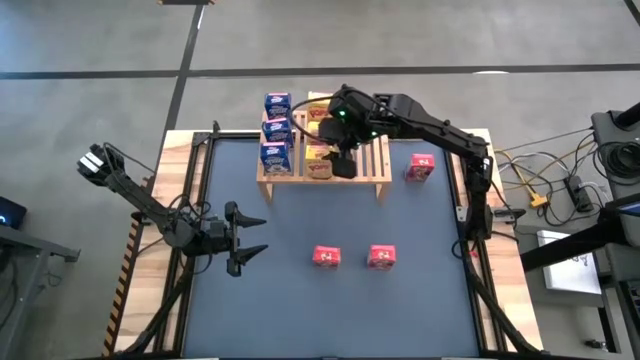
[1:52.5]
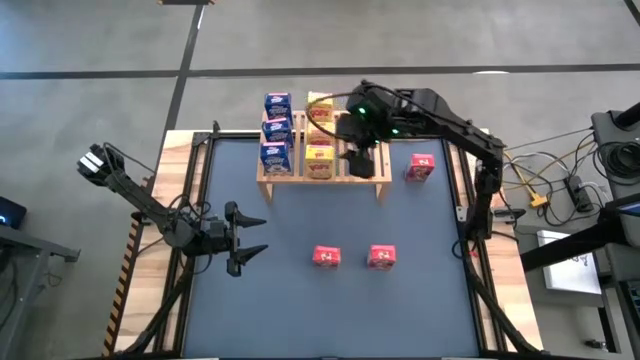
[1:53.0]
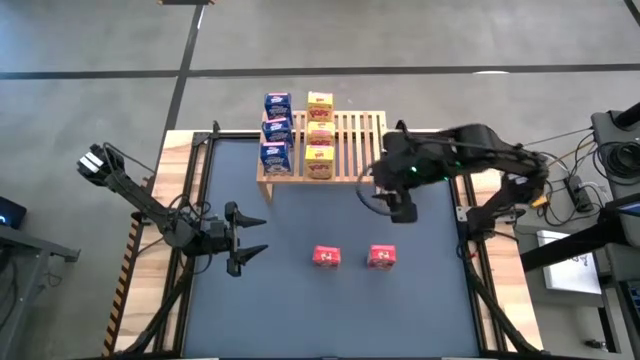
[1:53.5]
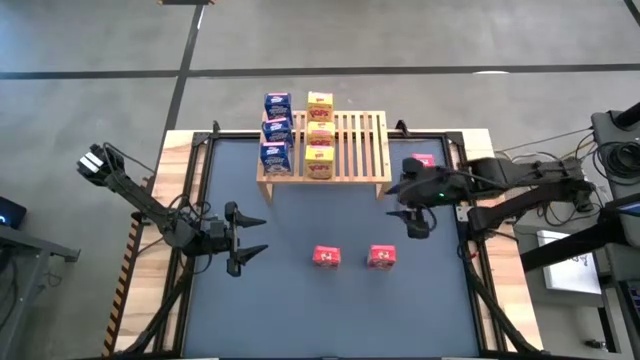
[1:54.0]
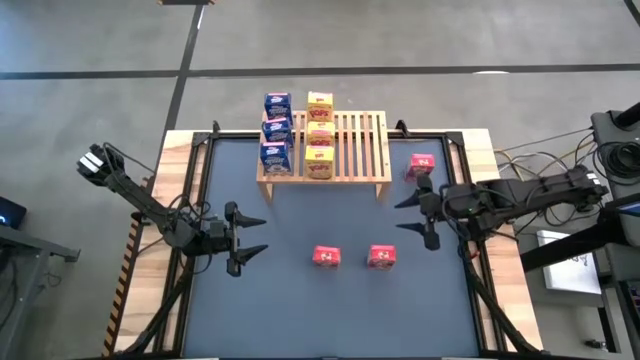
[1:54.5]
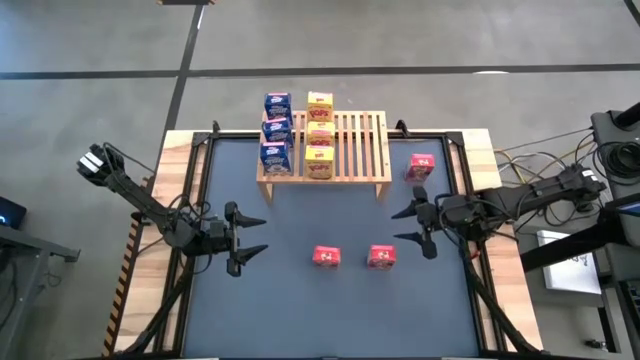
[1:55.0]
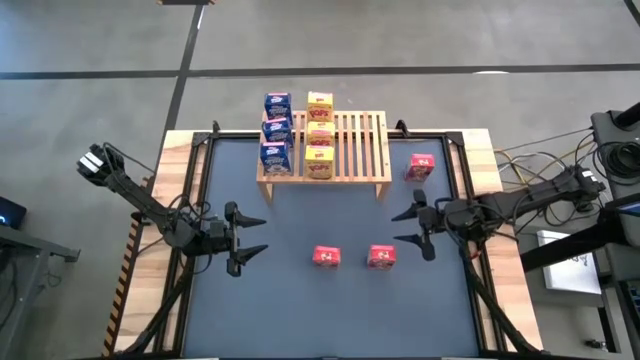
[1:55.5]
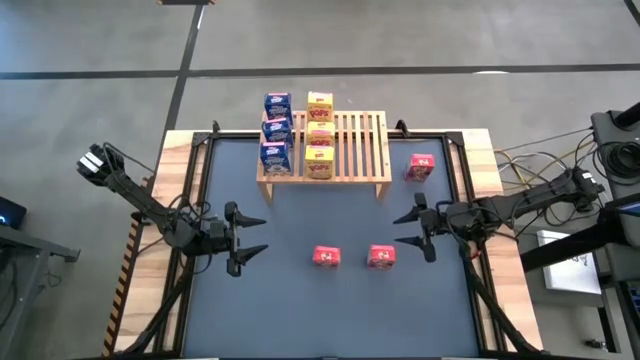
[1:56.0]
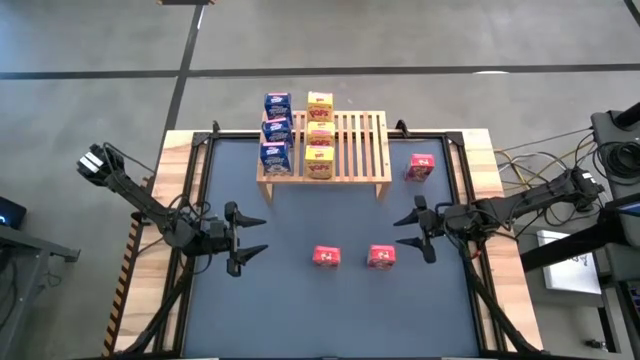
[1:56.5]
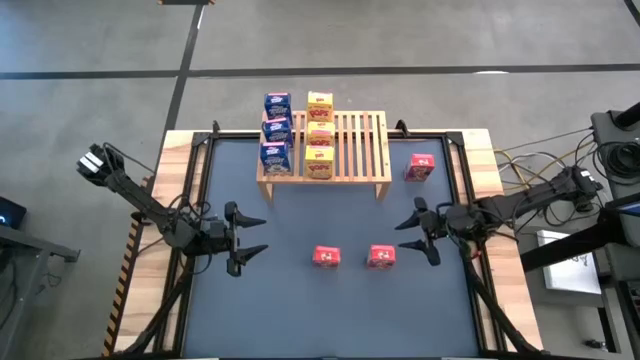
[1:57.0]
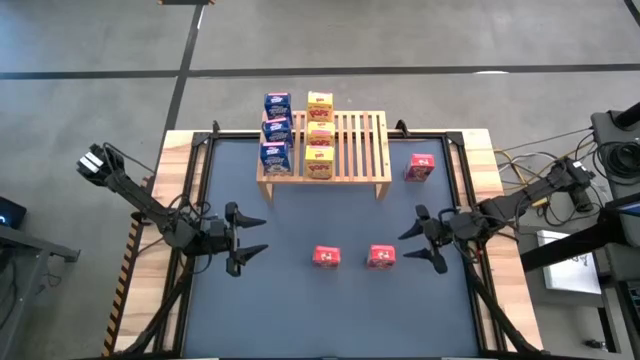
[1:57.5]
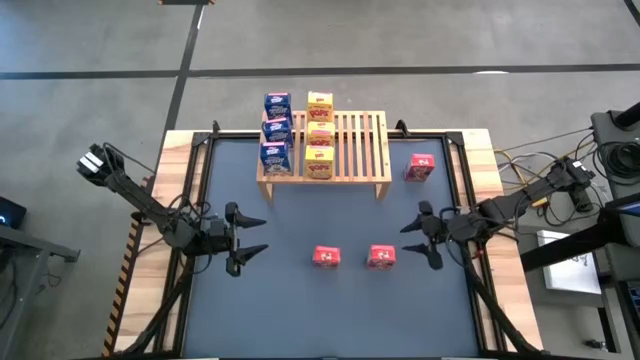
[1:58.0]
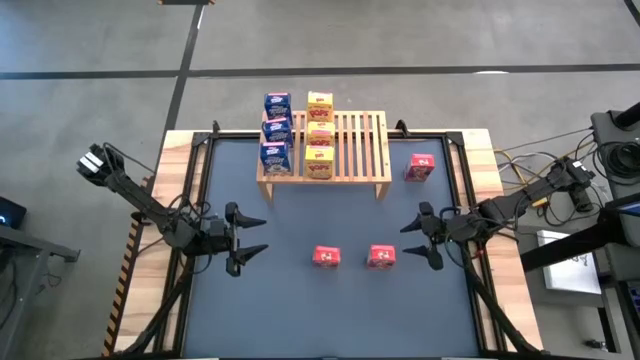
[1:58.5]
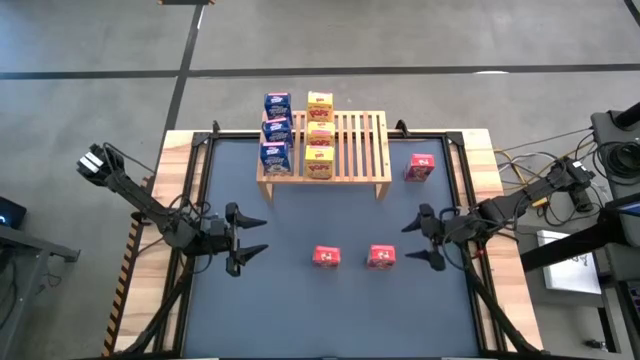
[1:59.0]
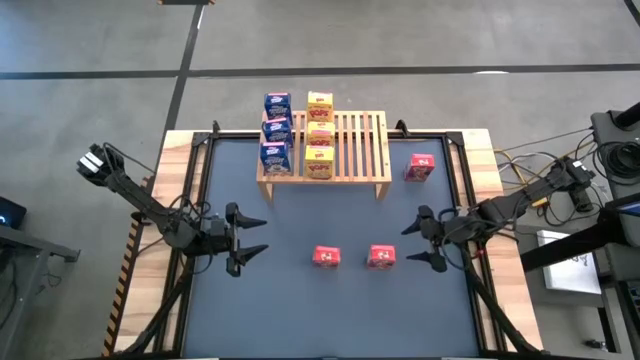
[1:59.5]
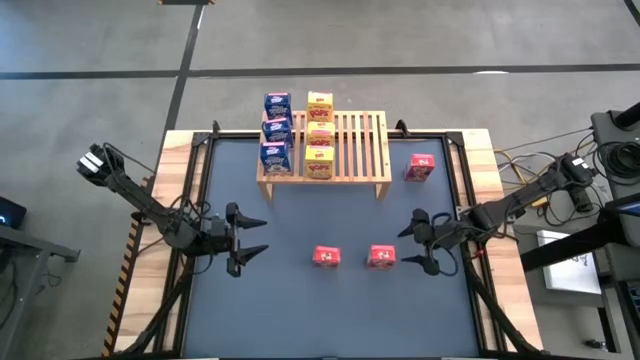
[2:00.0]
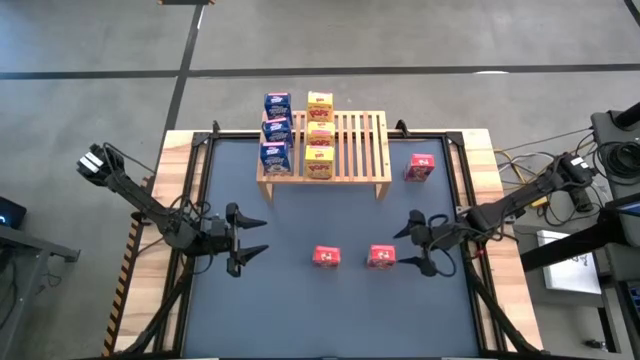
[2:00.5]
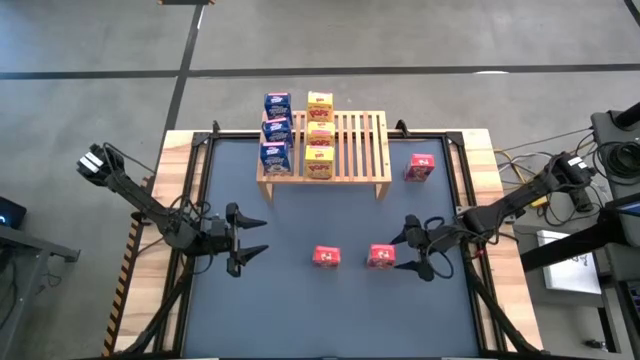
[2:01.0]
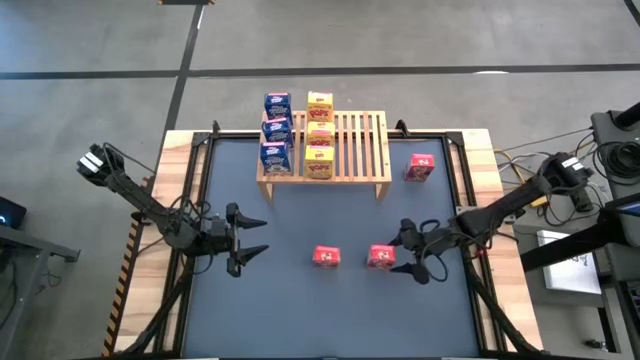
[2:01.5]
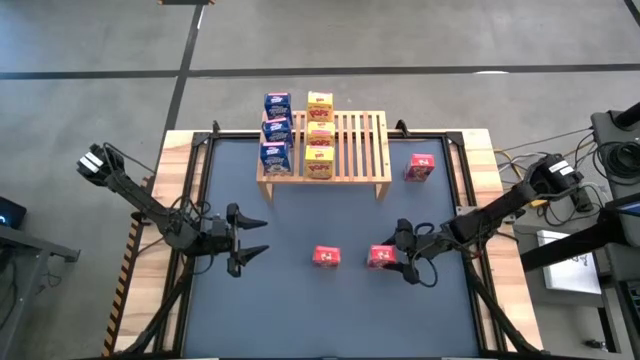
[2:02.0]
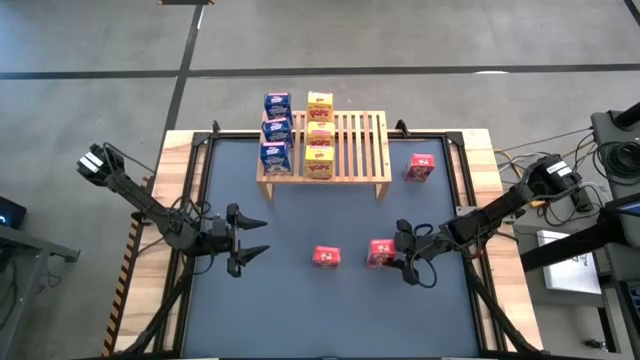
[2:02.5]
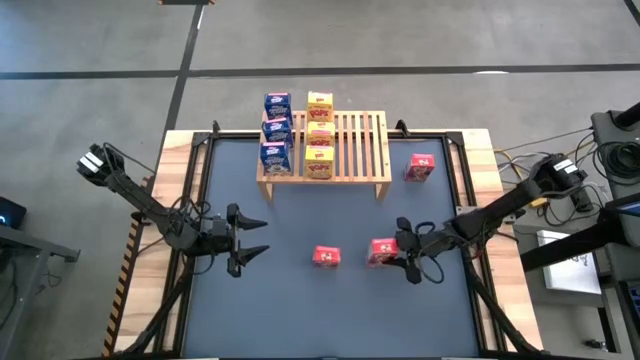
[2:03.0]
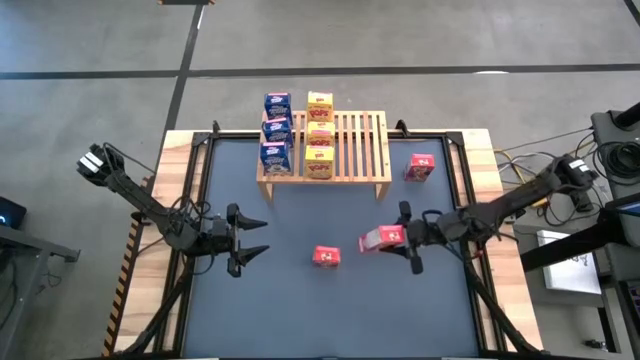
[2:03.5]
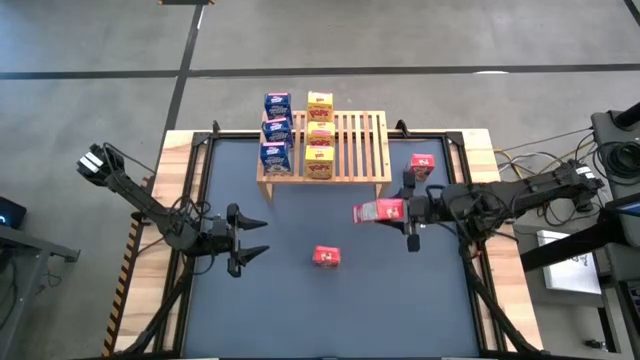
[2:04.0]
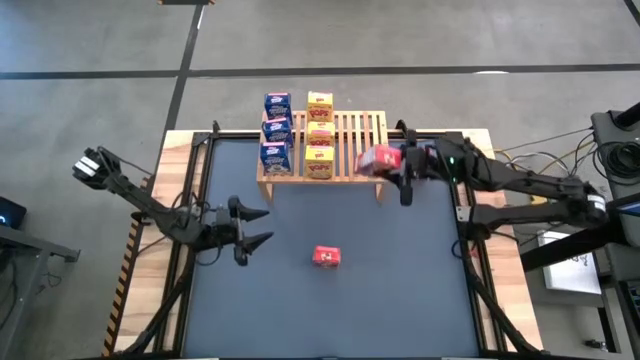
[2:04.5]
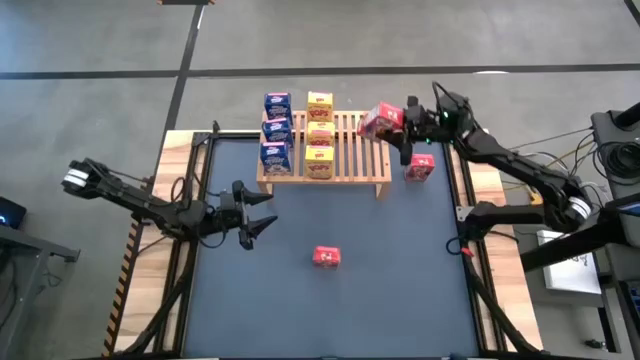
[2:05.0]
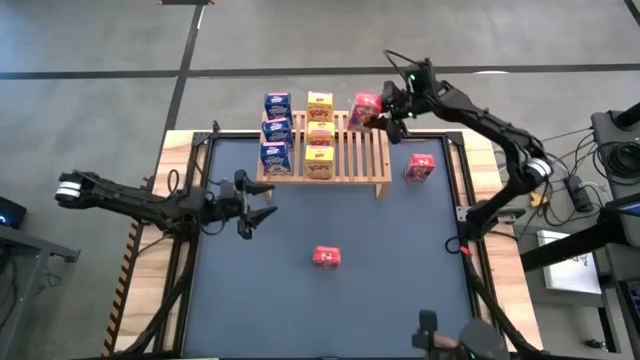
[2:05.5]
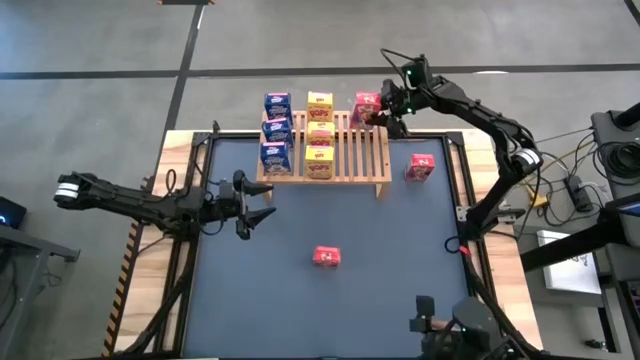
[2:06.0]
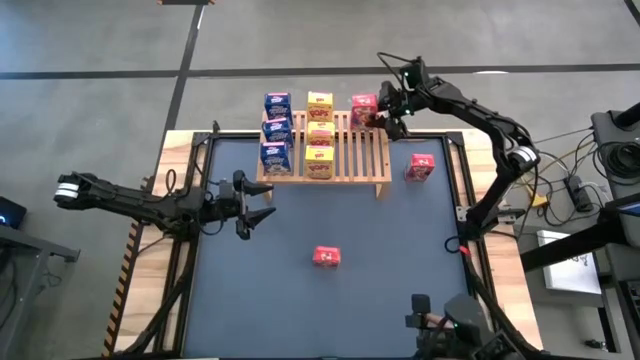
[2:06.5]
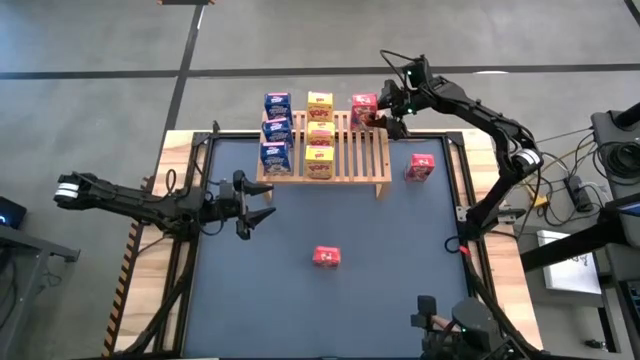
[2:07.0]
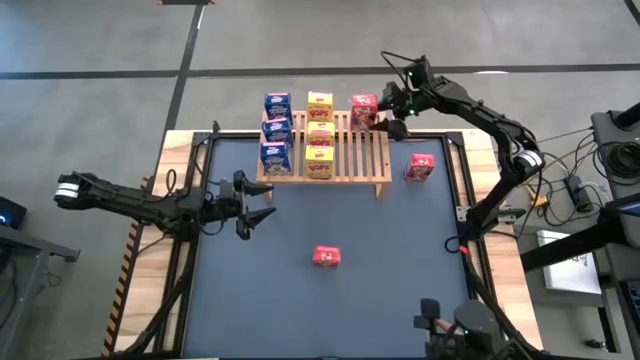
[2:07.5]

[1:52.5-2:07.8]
Task: Stack cereal on shelf
Put the bottom right red cereal box on the shelf

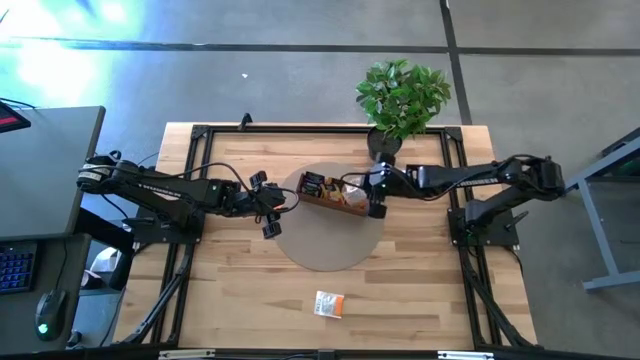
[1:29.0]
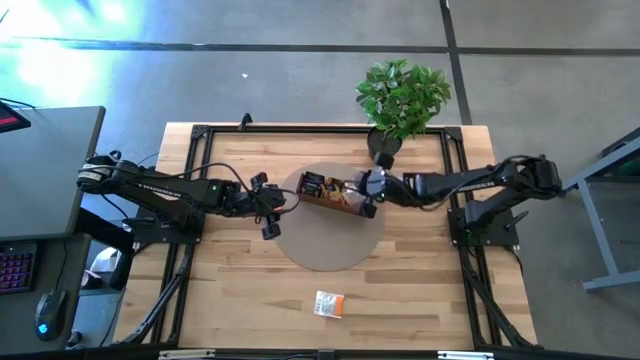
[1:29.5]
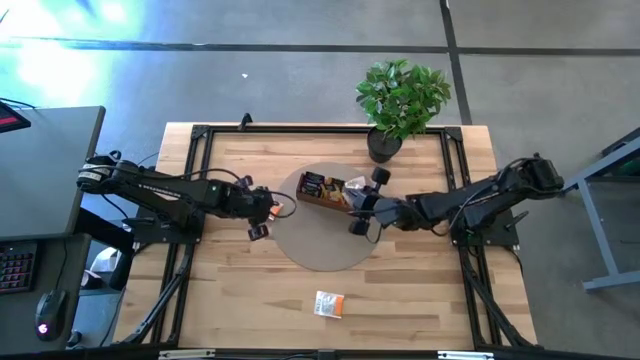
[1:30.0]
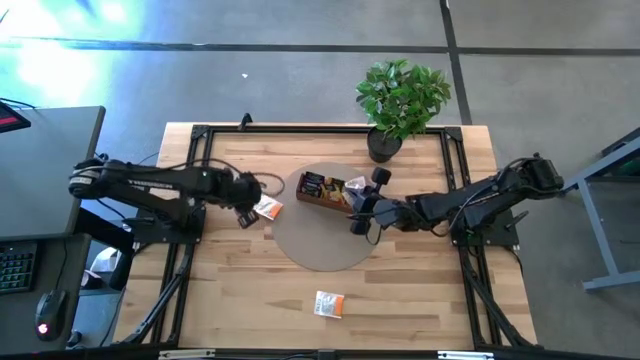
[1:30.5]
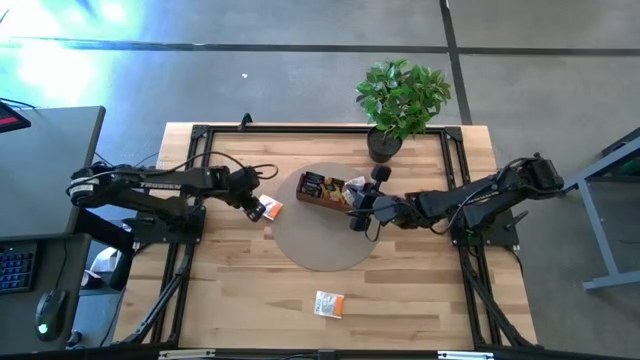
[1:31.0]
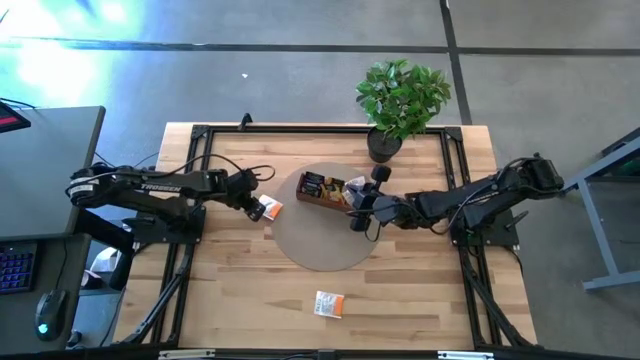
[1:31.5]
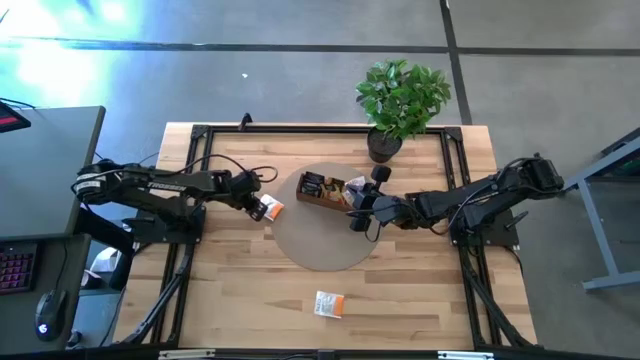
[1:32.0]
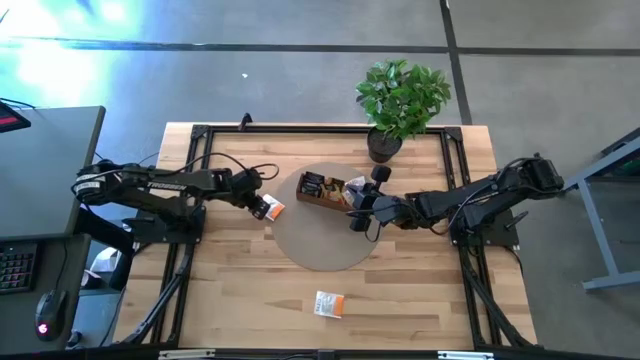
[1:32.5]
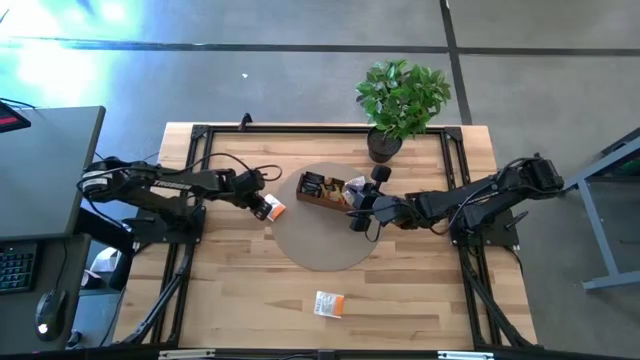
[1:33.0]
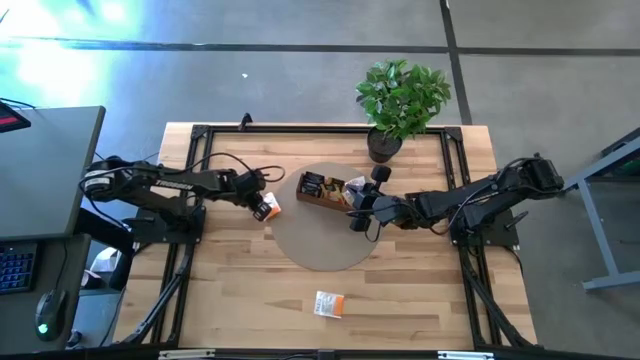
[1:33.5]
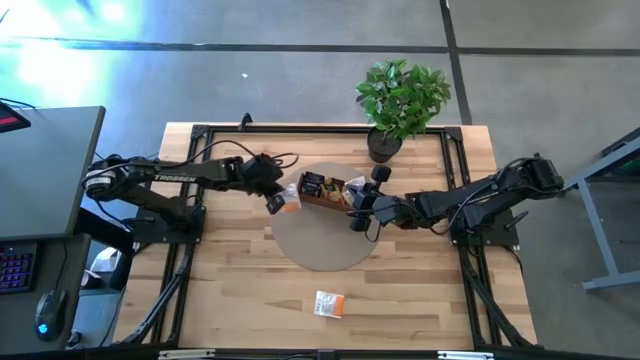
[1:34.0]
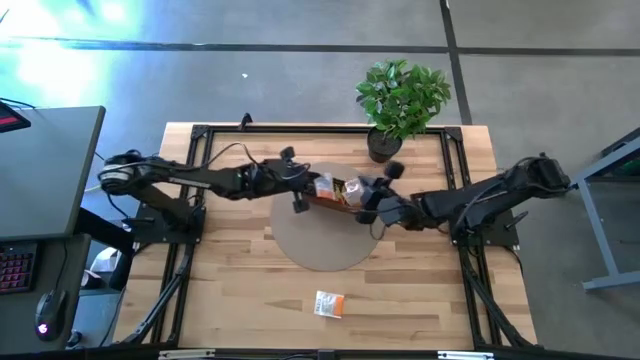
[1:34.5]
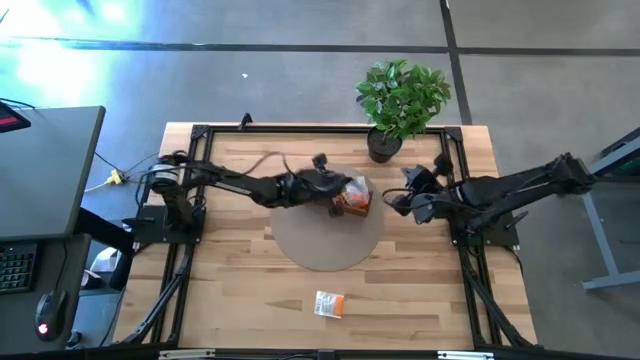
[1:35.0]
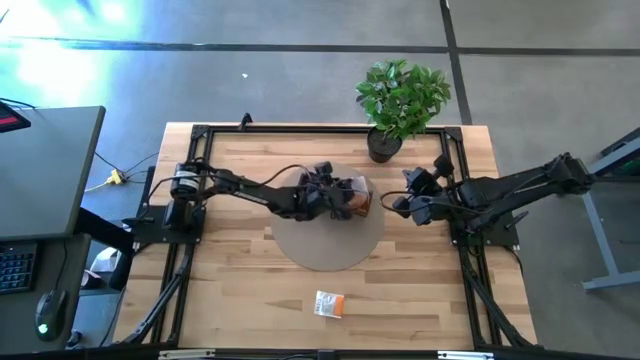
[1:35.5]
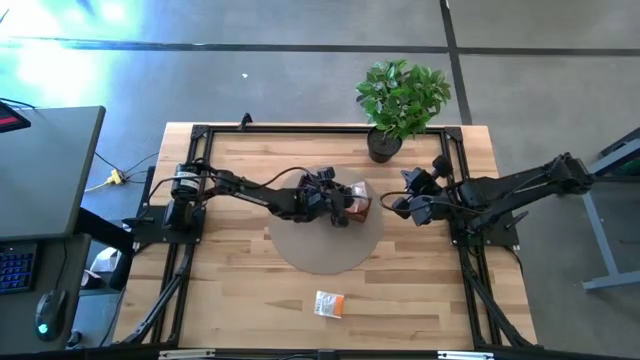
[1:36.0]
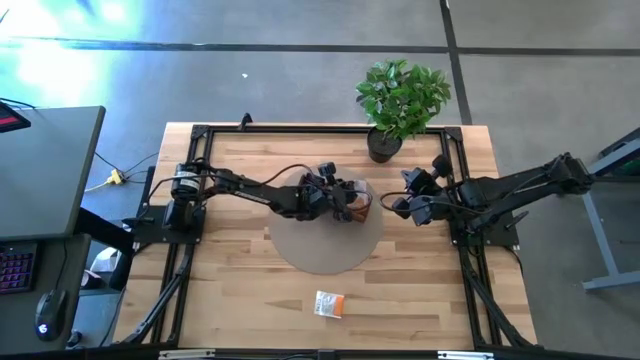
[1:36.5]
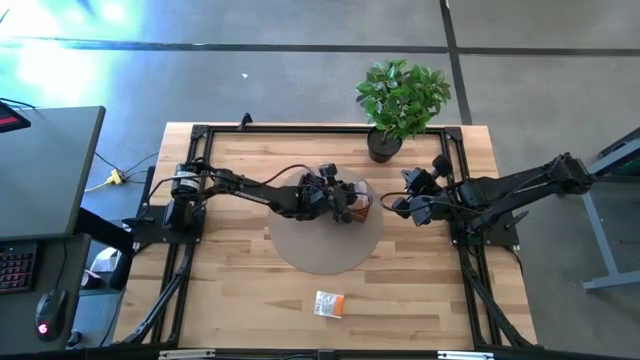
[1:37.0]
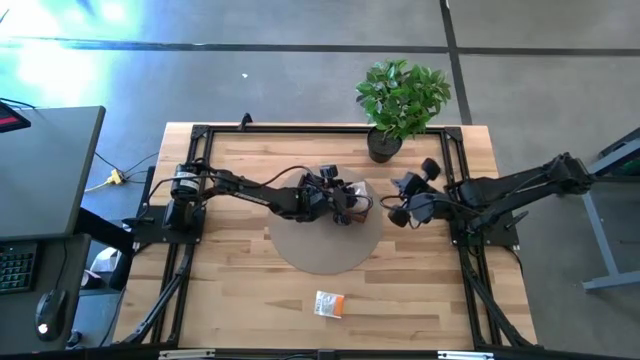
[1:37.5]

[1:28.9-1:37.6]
Task: Pick & Place Tea
Put the white tea bag into the right side area of the wooden organizer
